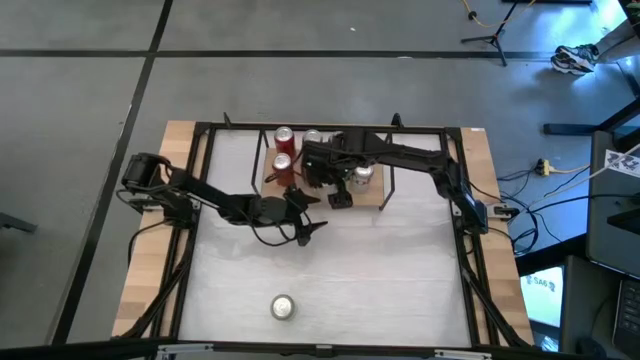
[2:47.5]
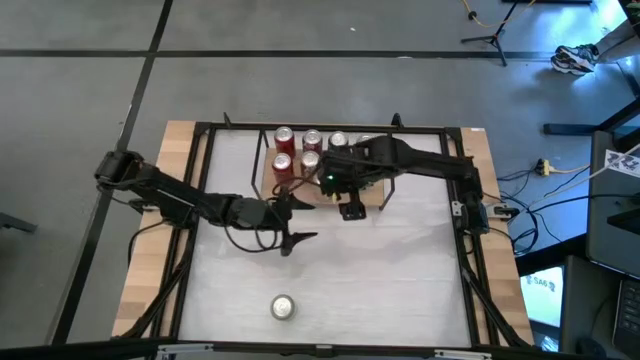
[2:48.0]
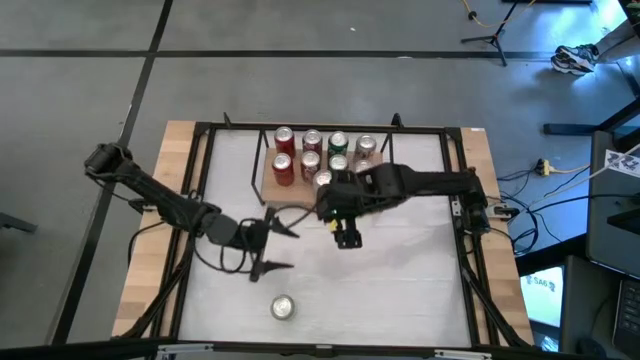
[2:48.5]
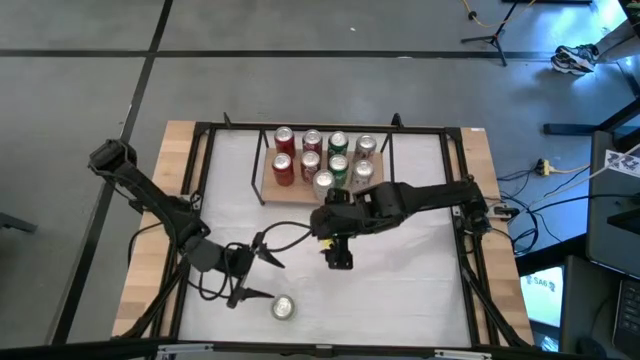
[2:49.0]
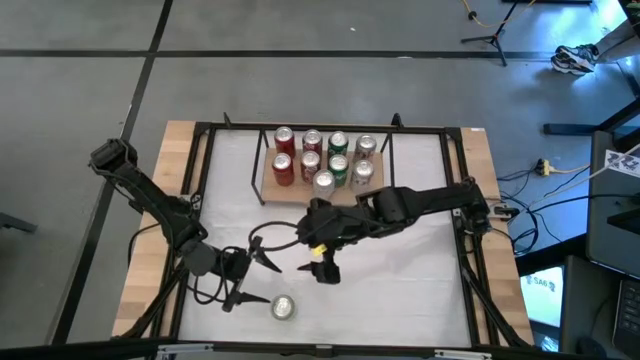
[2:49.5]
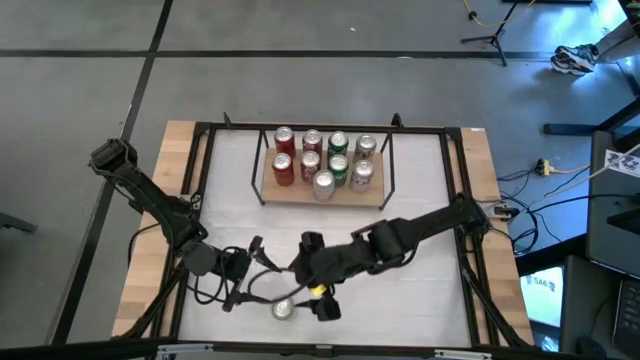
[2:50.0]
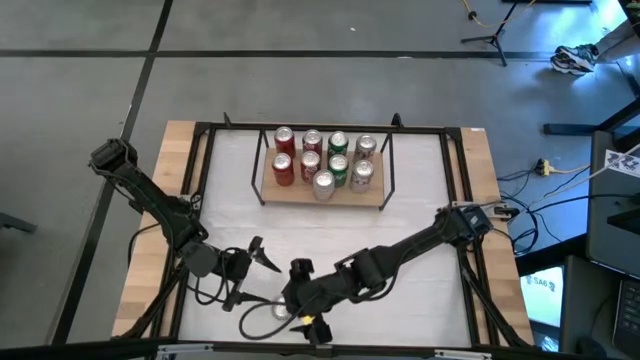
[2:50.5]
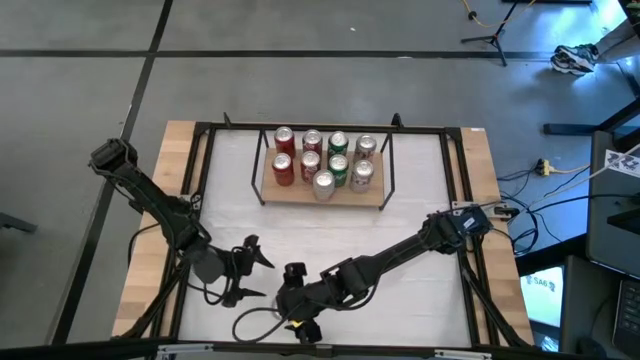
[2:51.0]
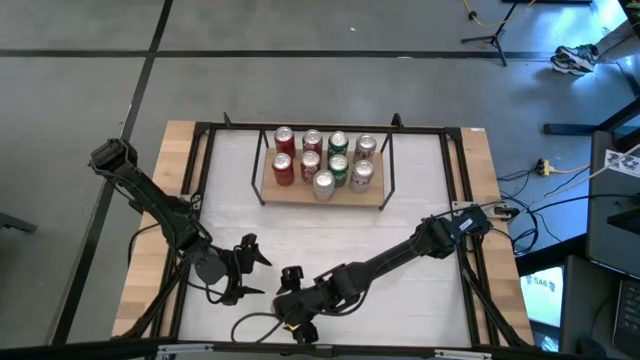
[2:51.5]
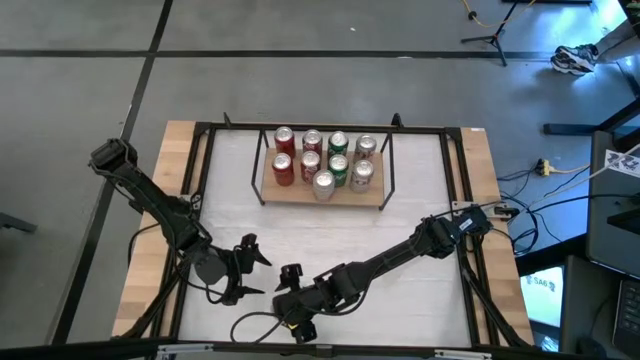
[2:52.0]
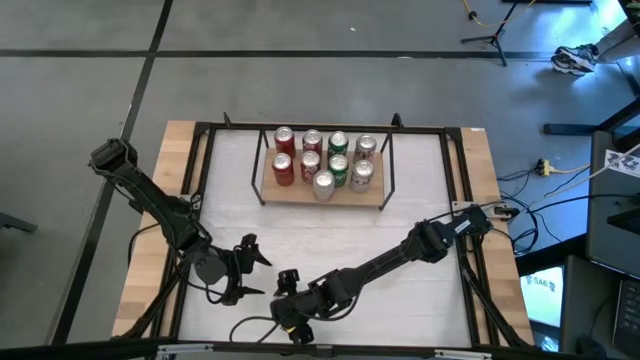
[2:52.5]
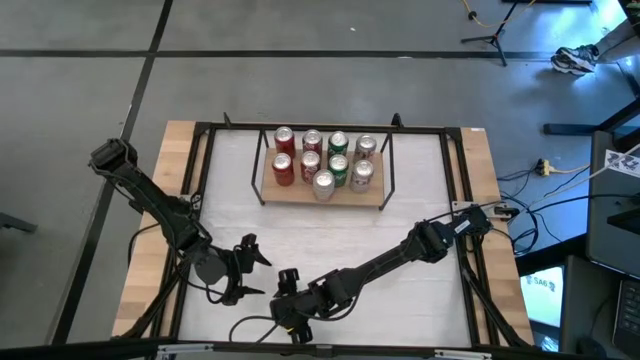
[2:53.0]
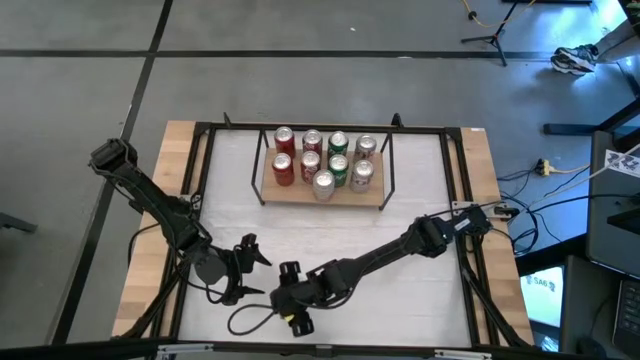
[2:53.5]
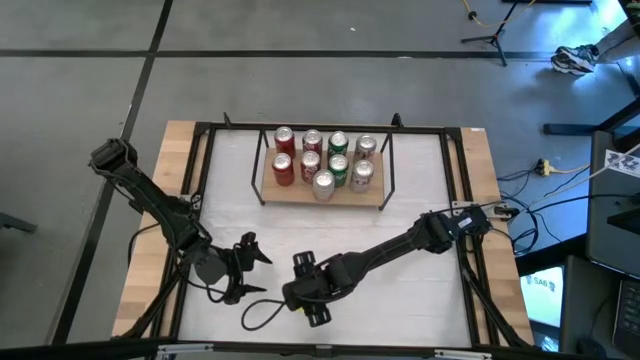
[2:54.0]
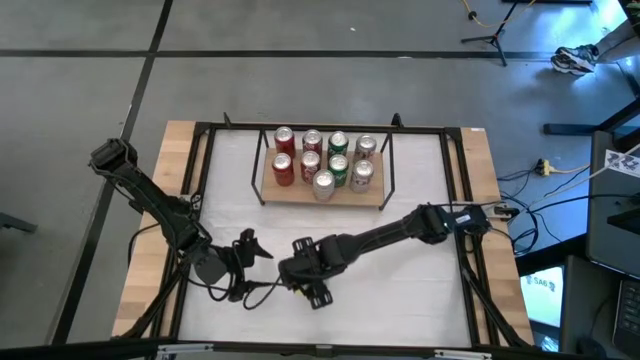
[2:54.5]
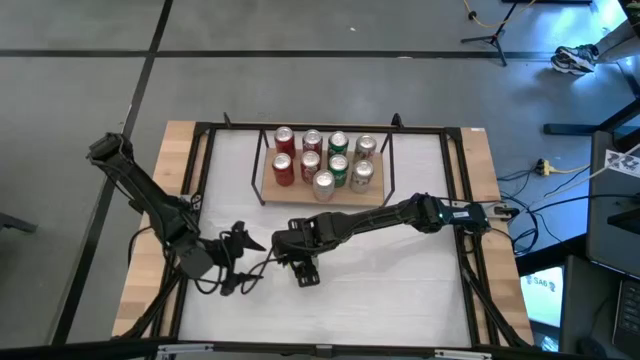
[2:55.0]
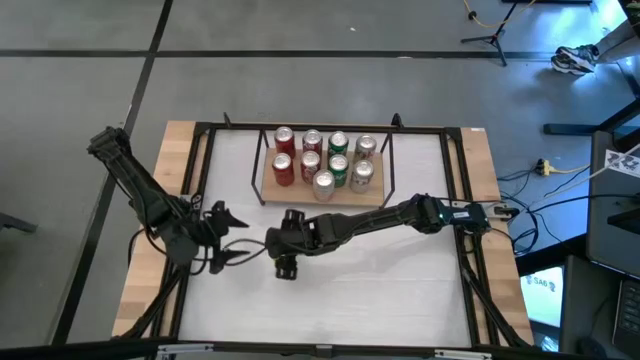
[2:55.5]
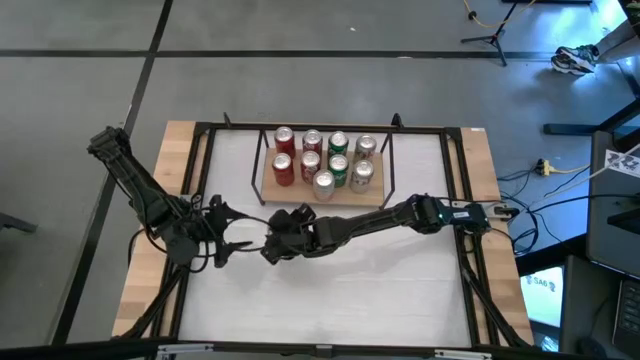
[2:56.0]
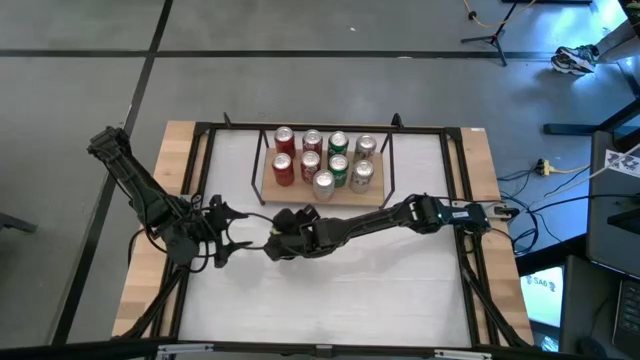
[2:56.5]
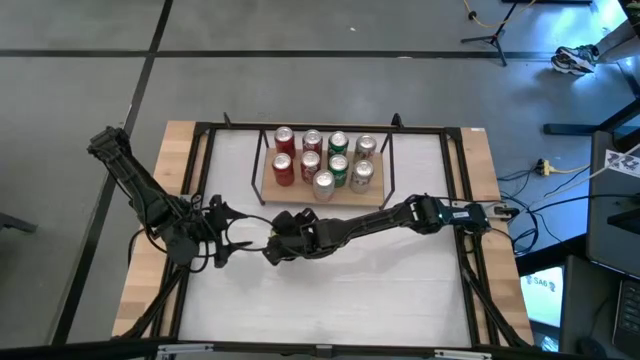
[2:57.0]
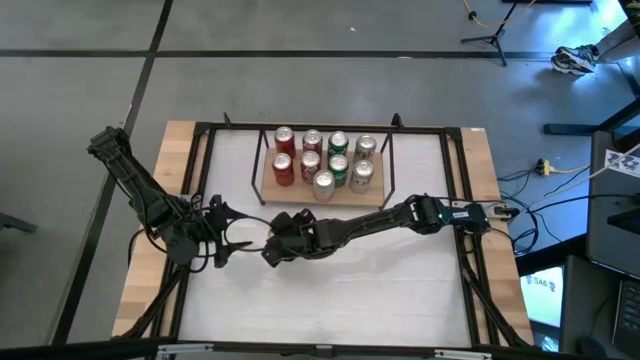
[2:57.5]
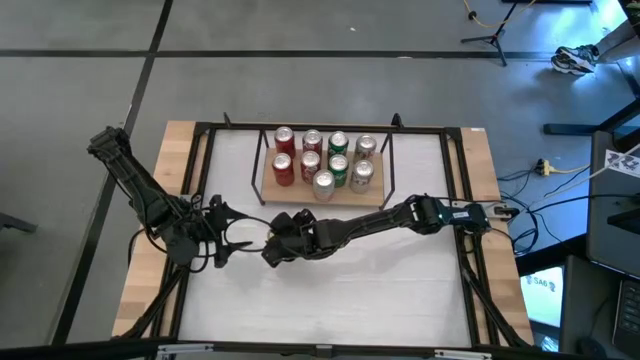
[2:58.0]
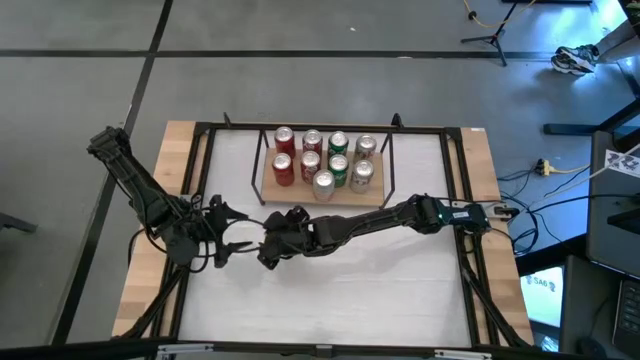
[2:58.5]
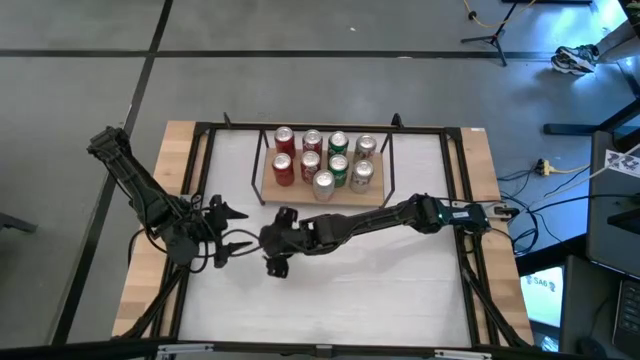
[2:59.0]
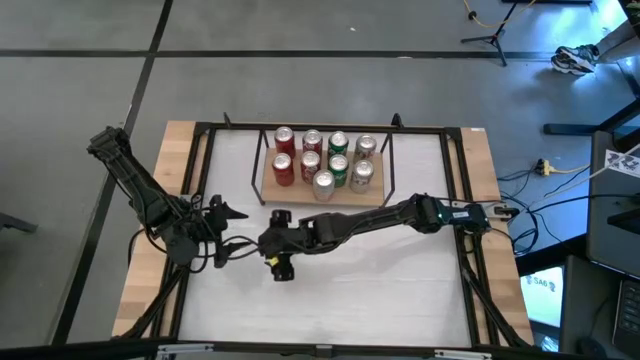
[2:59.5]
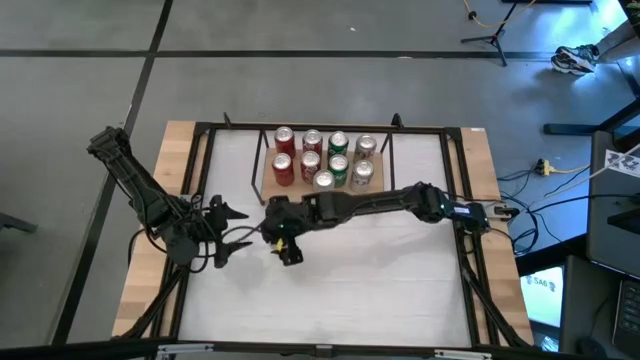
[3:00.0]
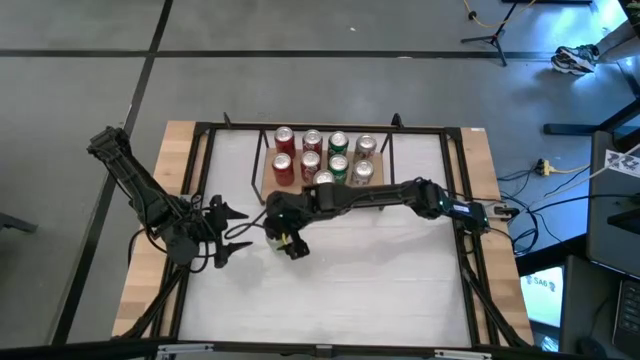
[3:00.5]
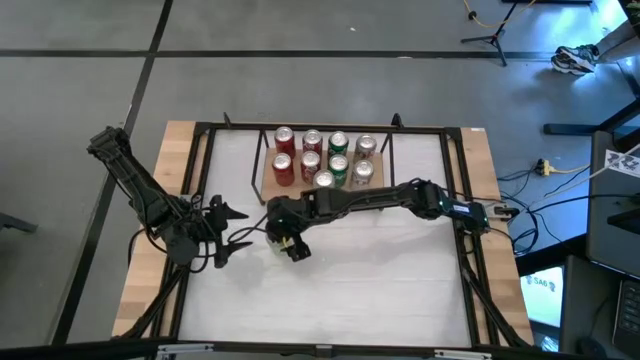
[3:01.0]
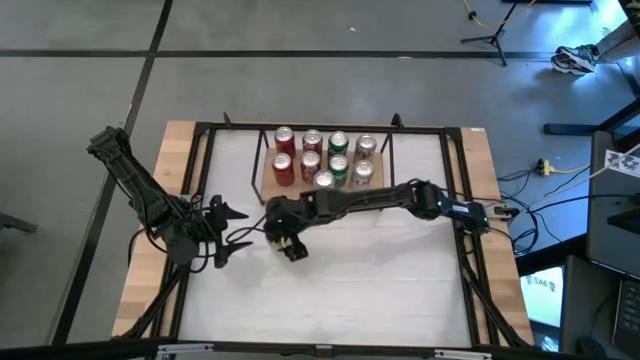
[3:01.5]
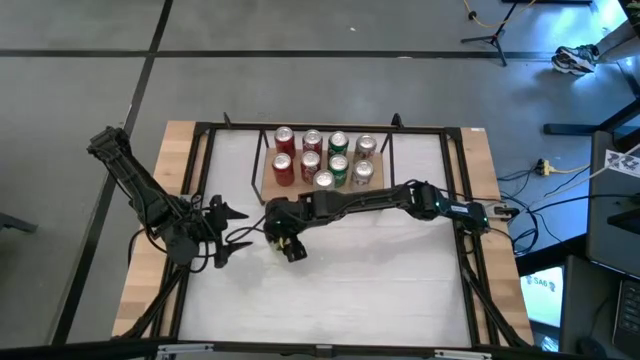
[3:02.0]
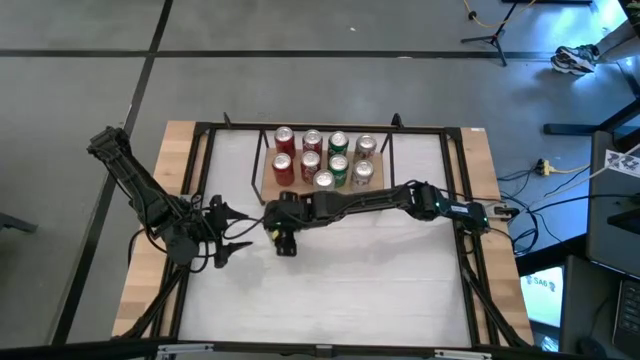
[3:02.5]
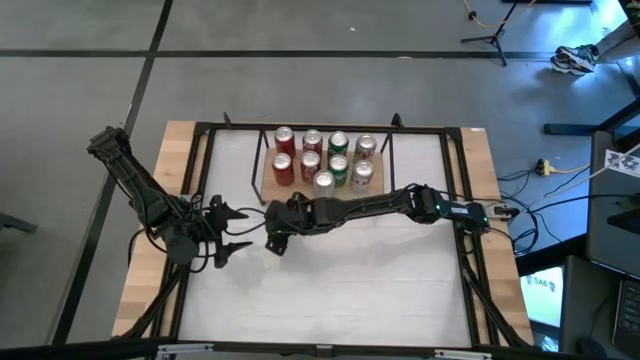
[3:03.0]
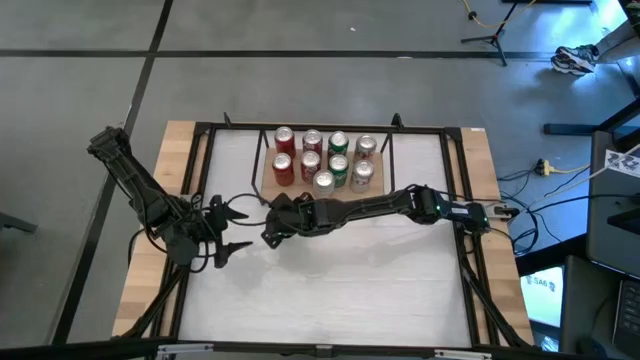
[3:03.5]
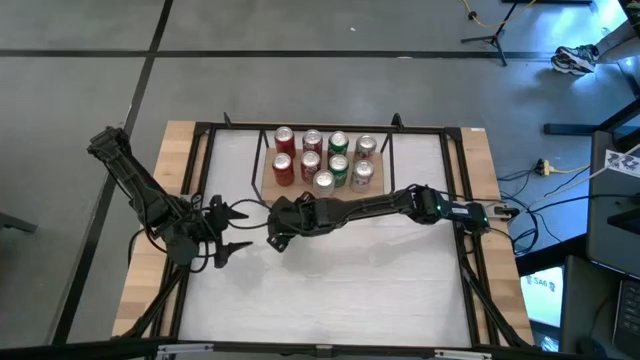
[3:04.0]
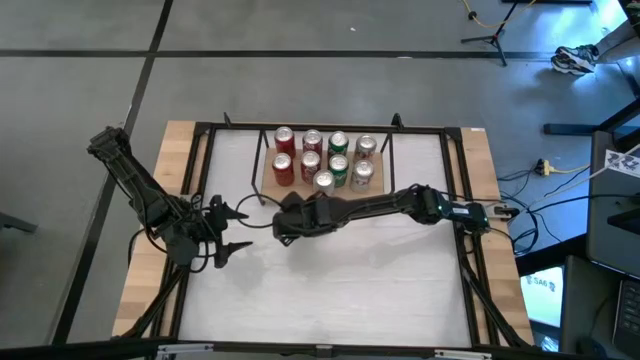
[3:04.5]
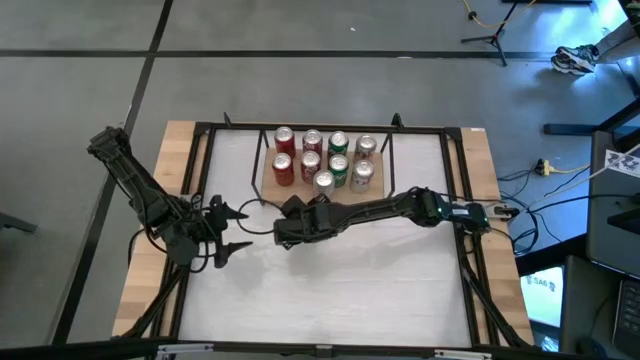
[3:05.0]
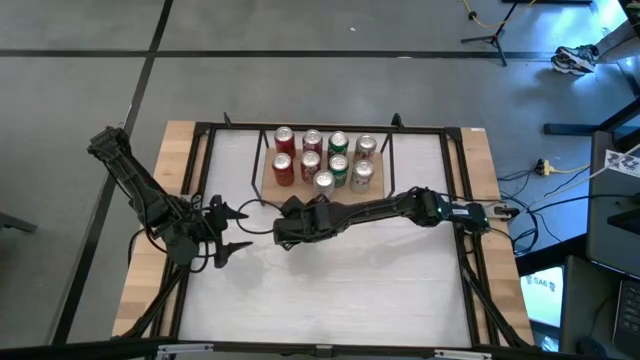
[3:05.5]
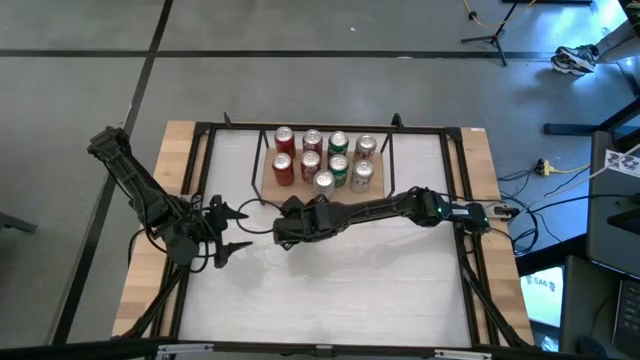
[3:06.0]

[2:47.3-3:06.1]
Task: Place canned beverage on shelf
Put the light green soda can on the shelf
